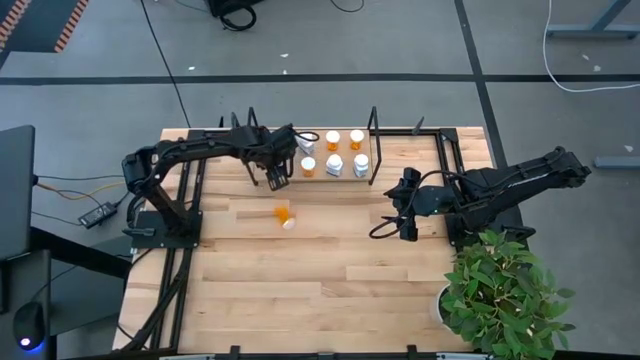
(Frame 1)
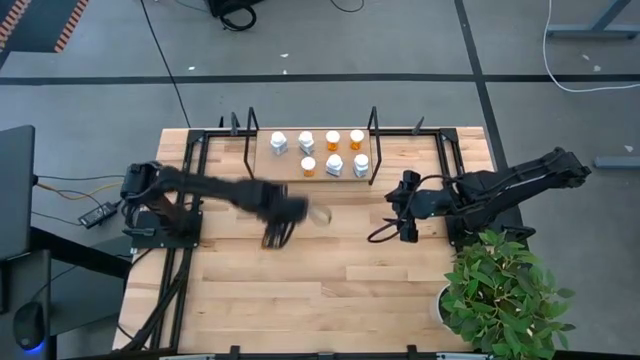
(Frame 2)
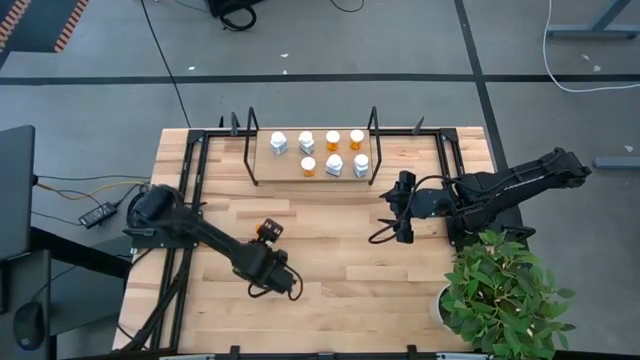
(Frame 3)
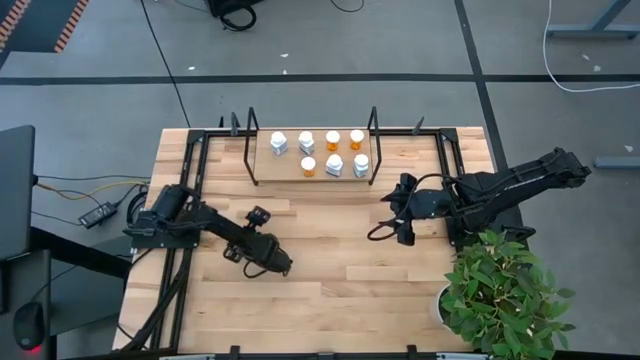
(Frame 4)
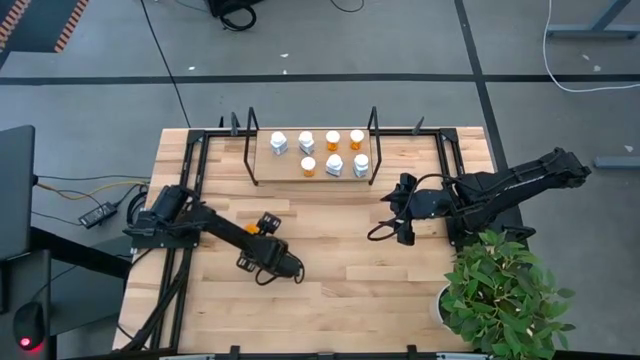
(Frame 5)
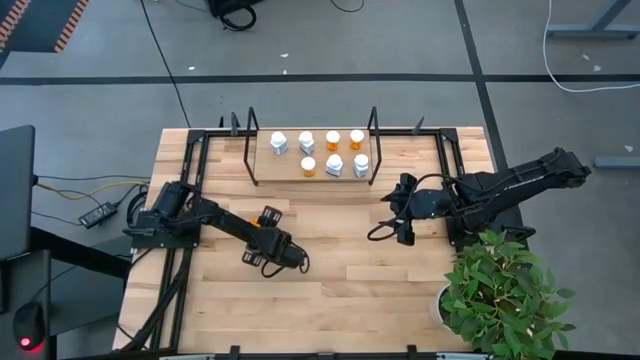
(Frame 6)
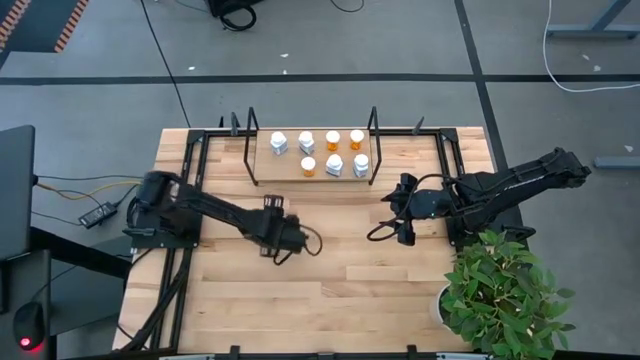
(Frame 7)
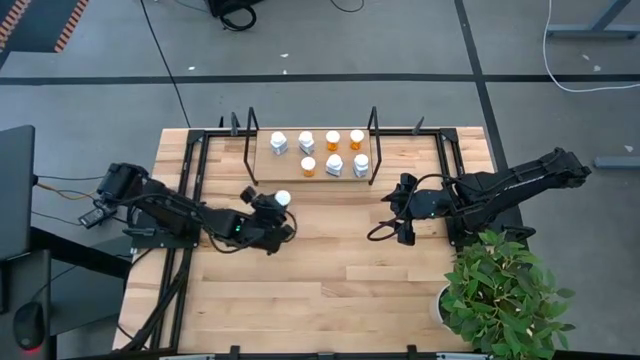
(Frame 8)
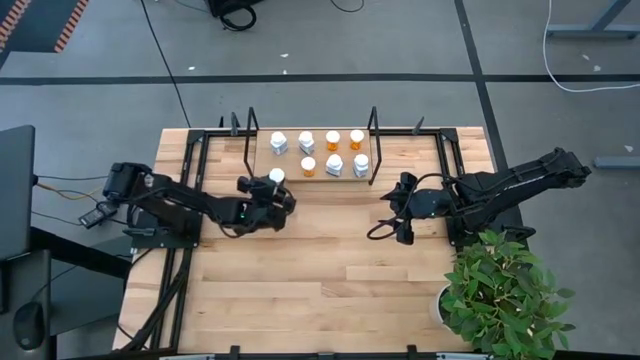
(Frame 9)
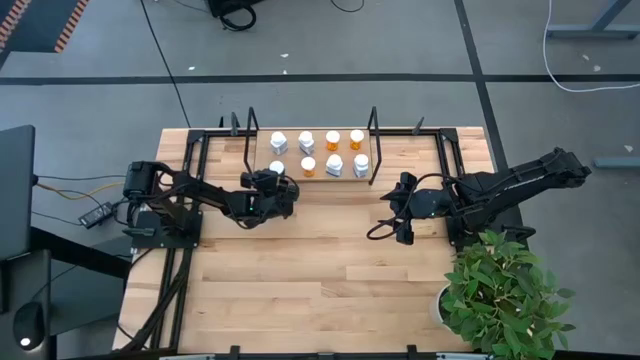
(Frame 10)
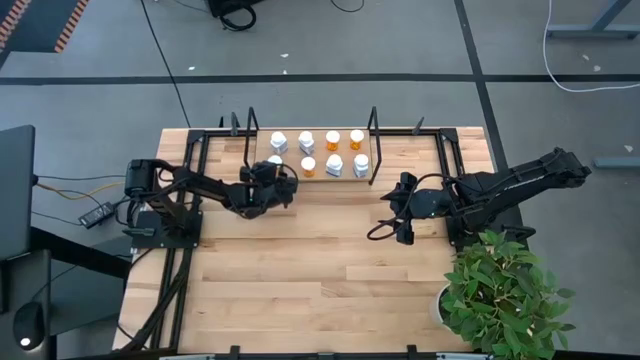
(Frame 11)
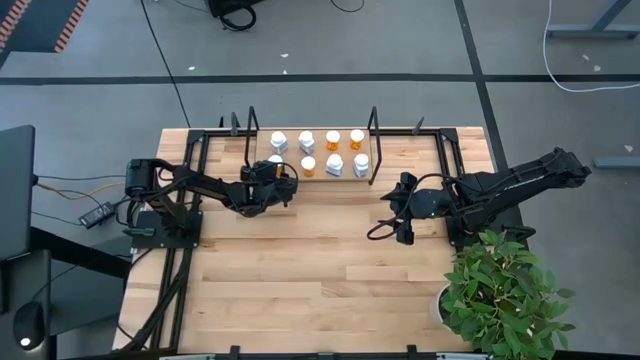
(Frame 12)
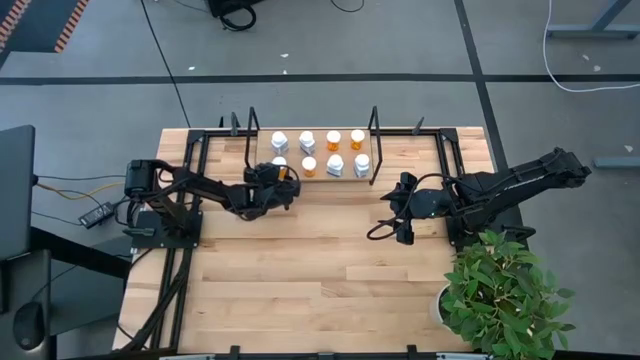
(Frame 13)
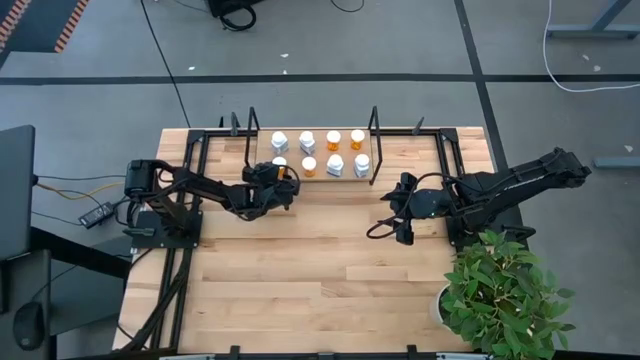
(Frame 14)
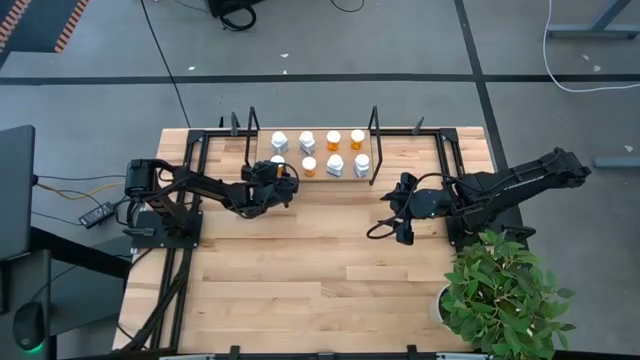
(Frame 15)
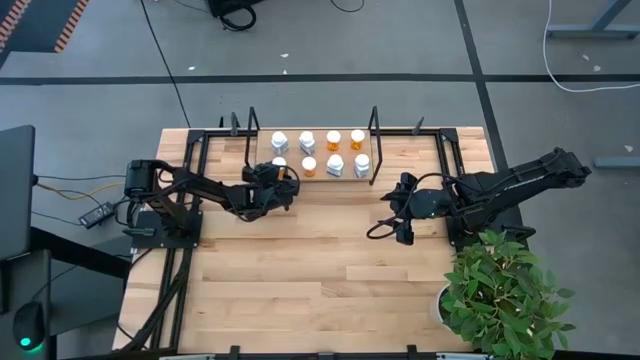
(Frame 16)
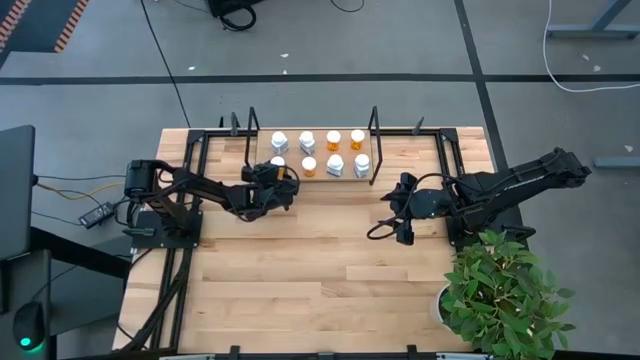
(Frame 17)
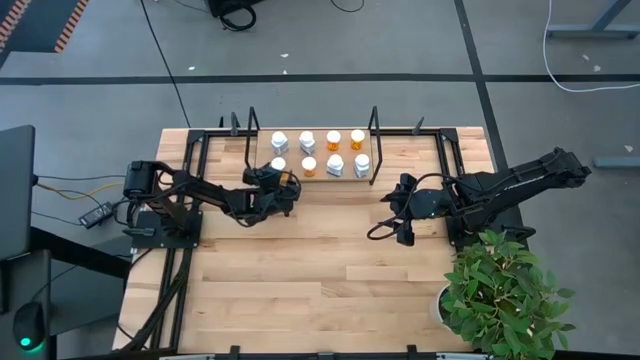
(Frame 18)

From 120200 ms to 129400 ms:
Task: Pick and place medicine bottles onto shelf by color
Put the orange pill bottle on the shelf

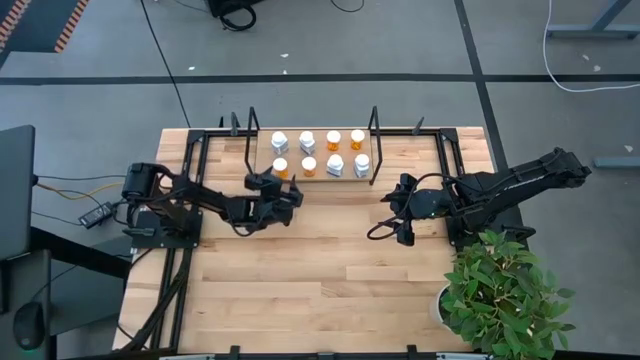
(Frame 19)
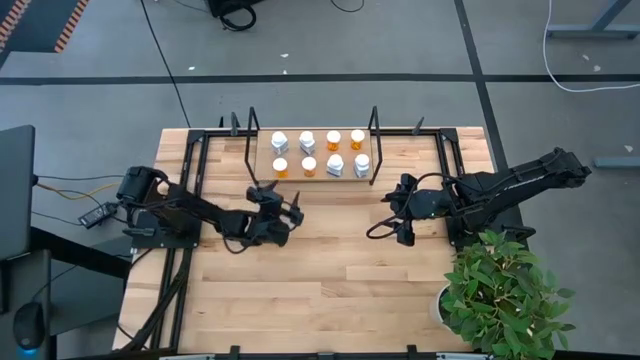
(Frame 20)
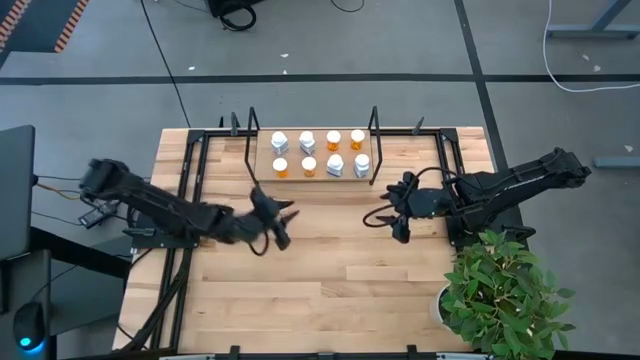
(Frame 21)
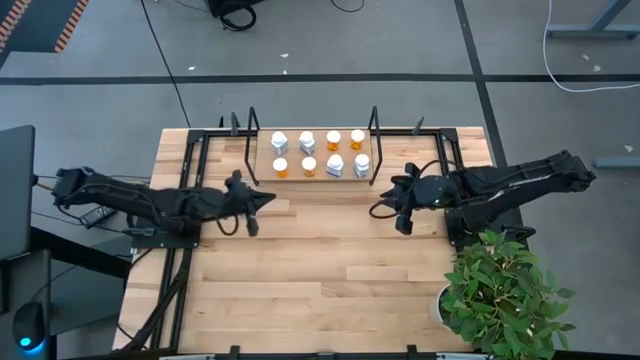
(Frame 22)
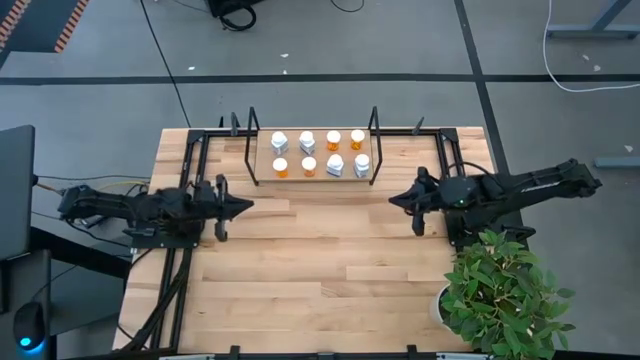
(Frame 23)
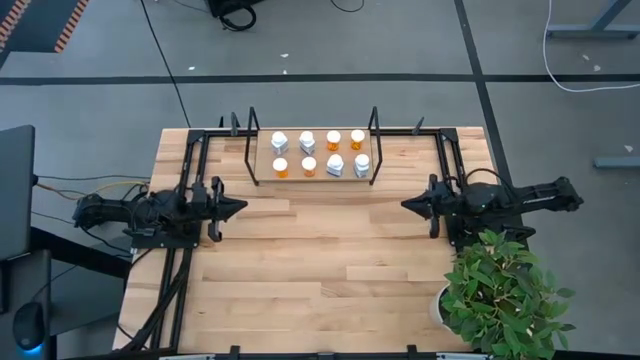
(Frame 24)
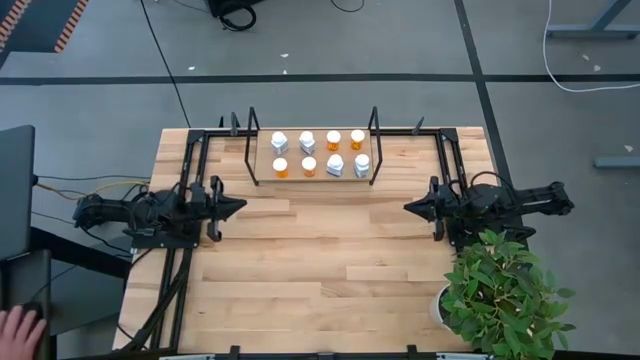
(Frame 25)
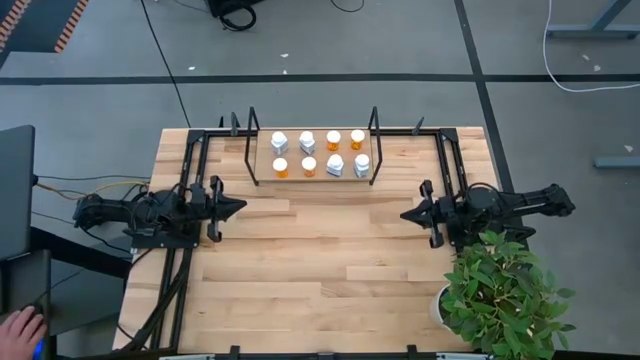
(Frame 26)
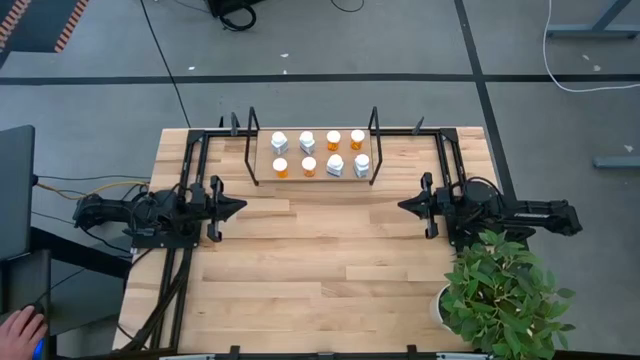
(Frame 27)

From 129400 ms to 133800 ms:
Return to Home Position

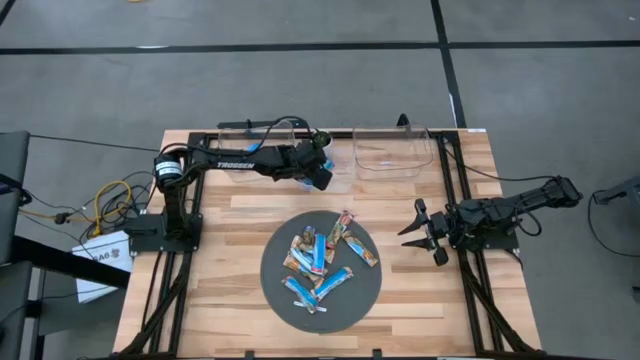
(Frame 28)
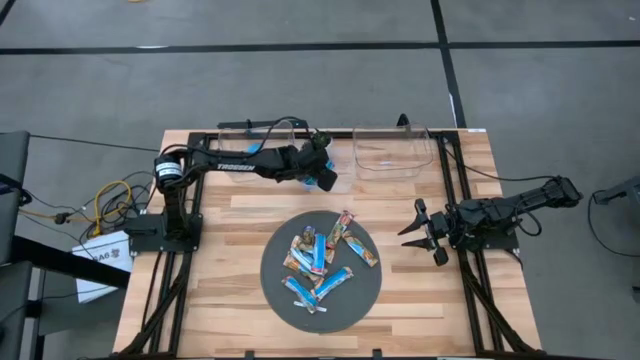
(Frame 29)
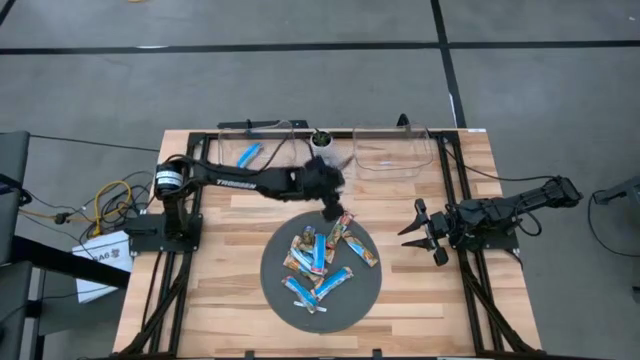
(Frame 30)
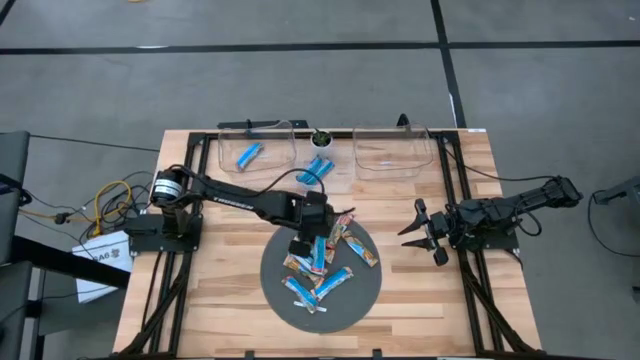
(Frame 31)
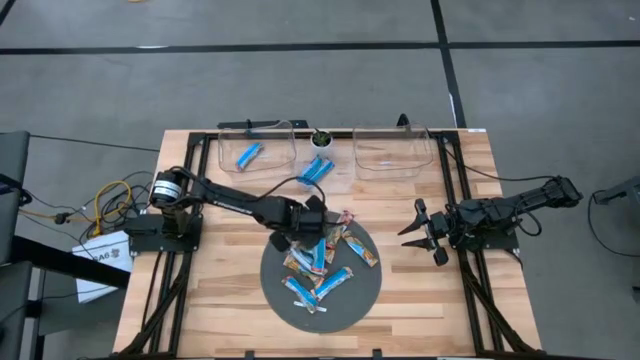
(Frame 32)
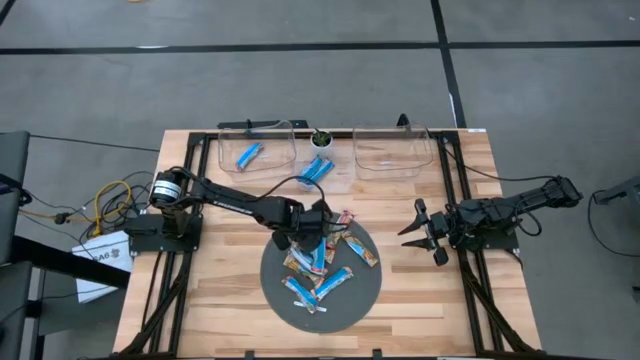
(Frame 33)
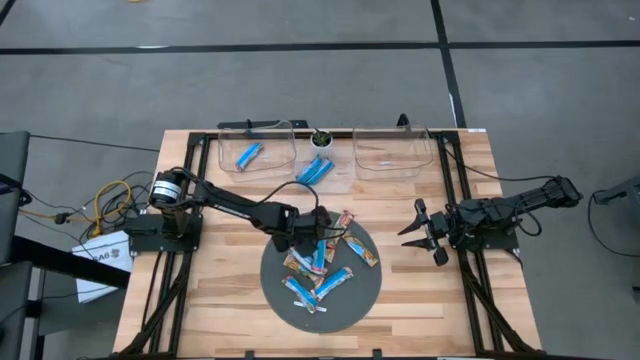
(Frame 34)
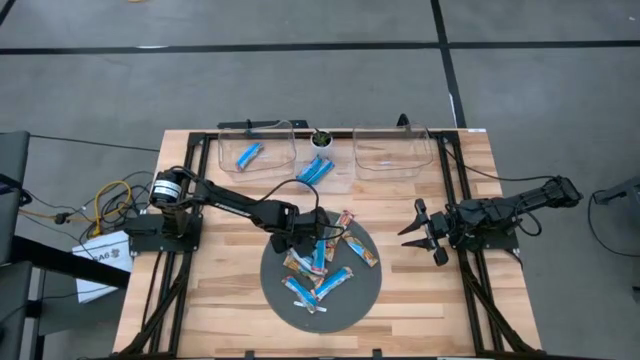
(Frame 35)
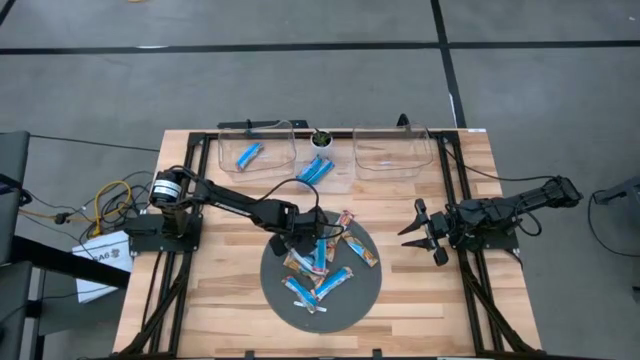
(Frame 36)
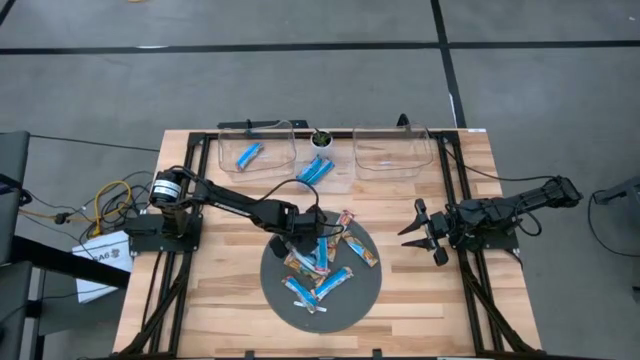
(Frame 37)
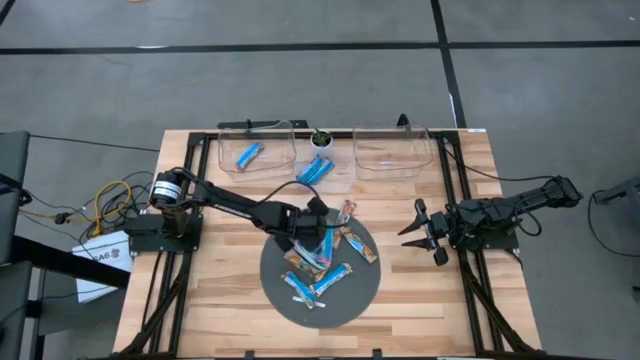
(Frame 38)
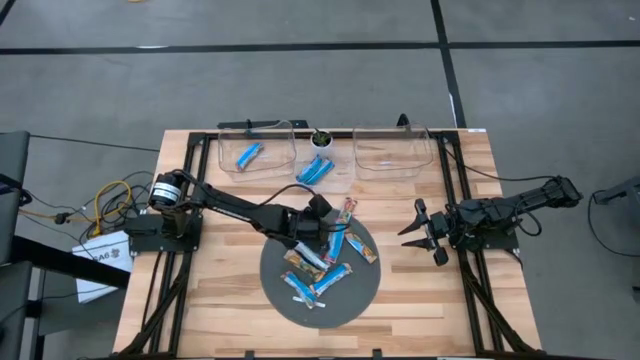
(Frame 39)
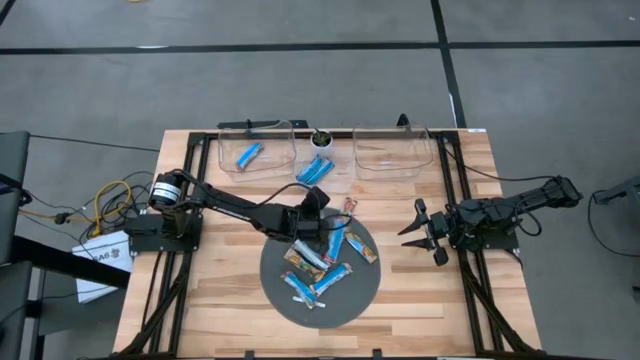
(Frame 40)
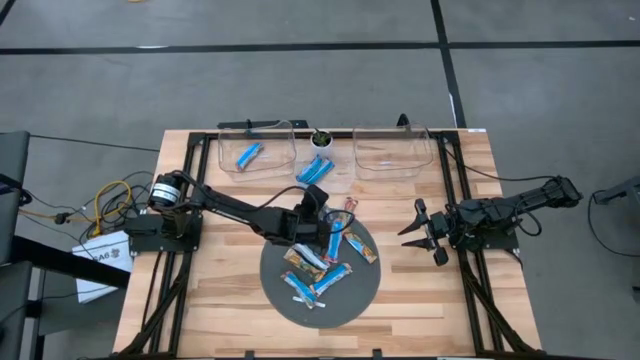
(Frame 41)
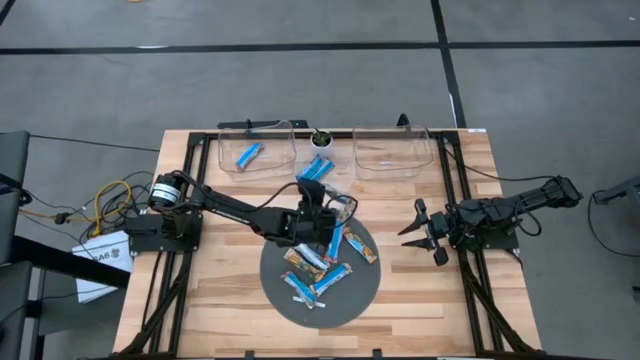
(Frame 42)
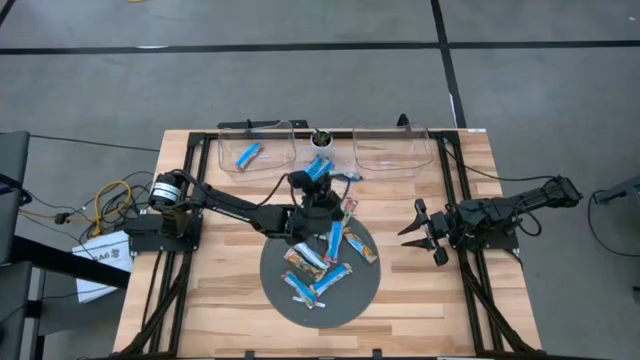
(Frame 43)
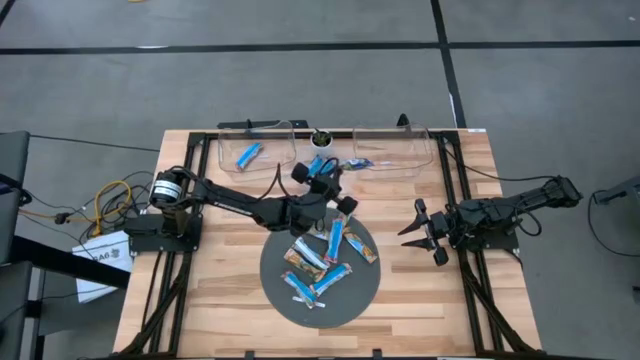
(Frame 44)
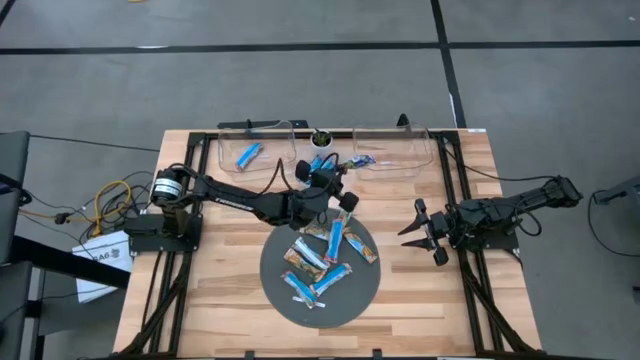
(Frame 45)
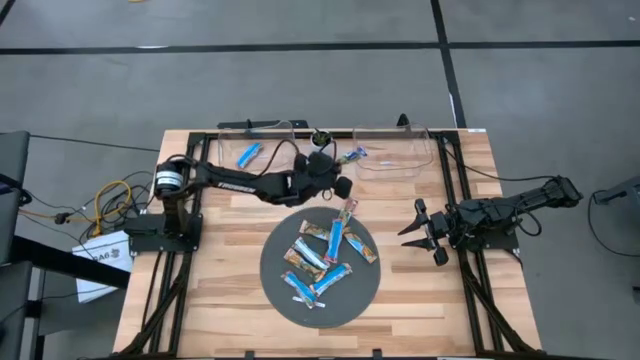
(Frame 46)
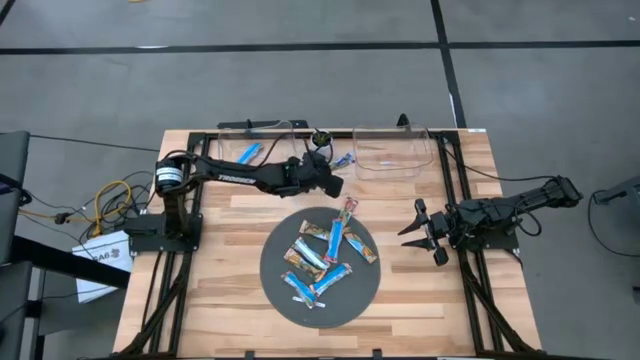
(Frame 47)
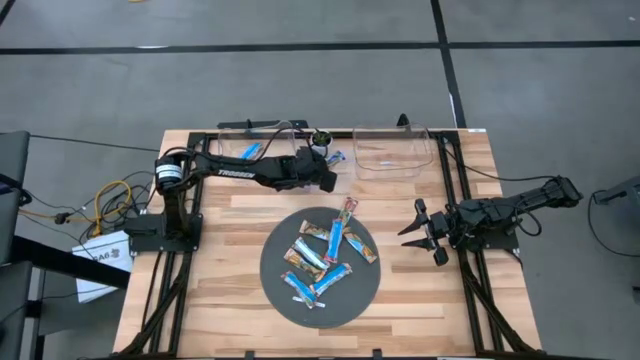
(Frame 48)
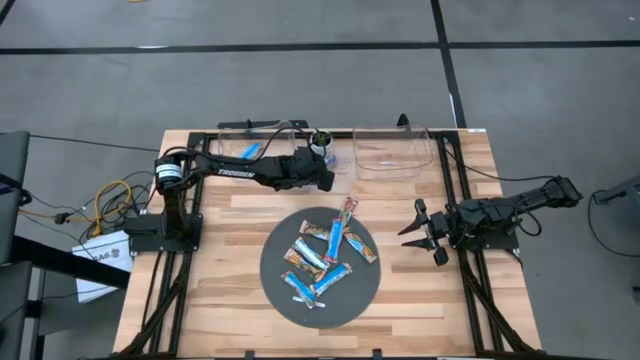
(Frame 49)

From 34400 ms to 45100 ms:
Task: Pick and place Granola Bars by type
Put the blue granola bar into the white bin
